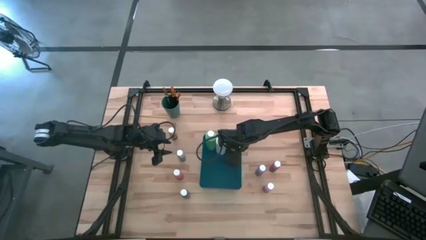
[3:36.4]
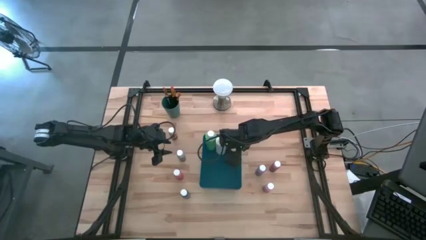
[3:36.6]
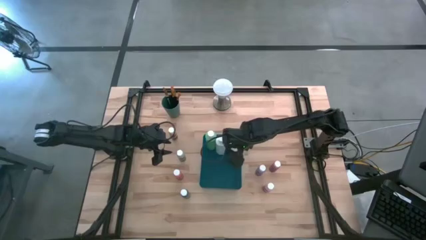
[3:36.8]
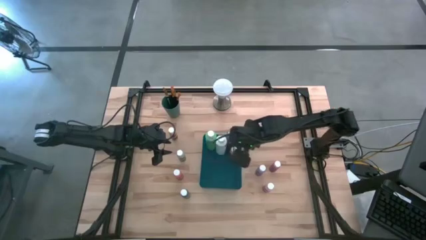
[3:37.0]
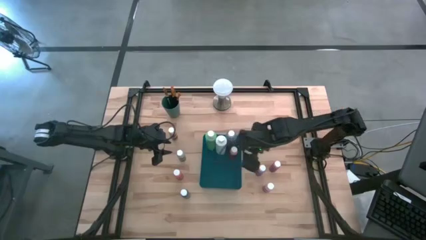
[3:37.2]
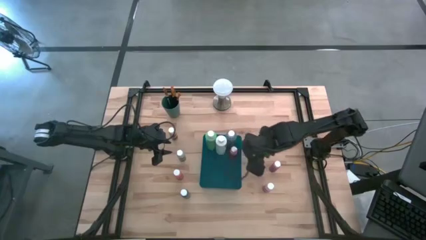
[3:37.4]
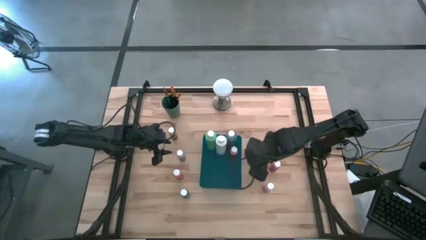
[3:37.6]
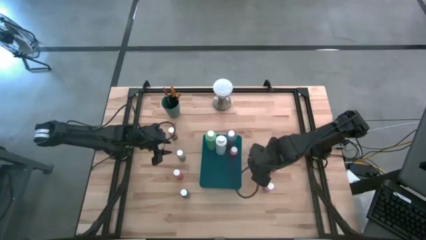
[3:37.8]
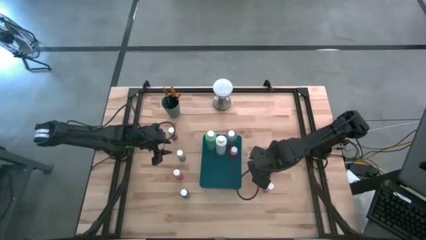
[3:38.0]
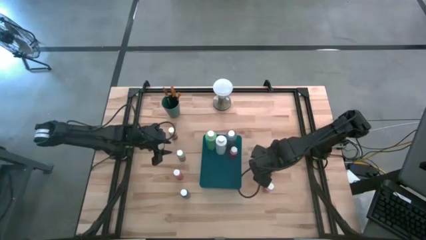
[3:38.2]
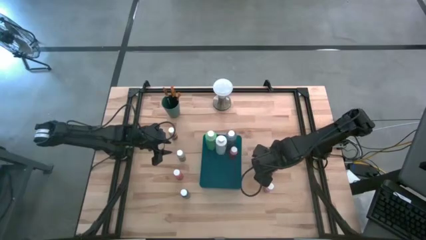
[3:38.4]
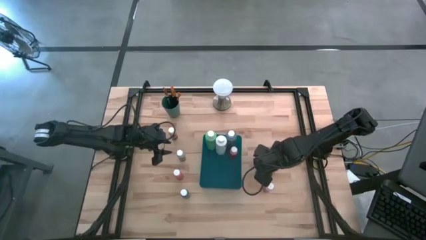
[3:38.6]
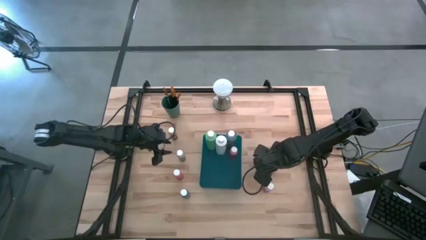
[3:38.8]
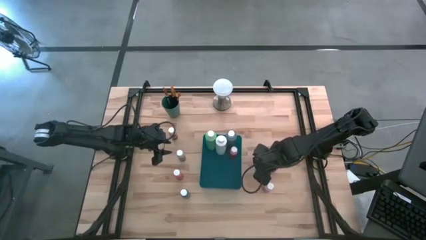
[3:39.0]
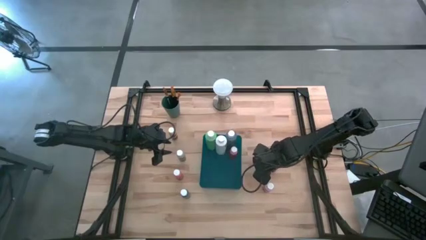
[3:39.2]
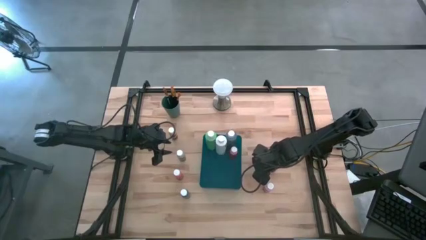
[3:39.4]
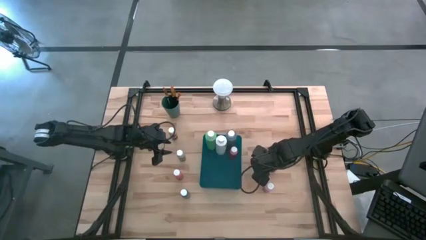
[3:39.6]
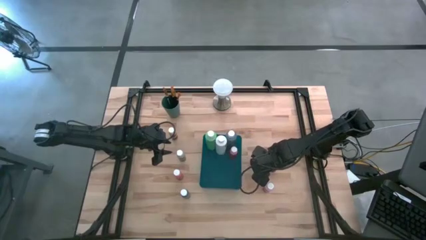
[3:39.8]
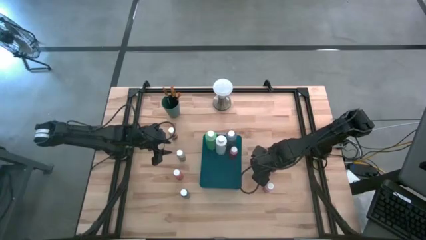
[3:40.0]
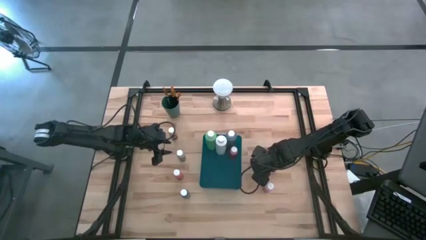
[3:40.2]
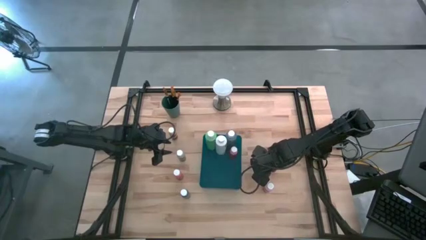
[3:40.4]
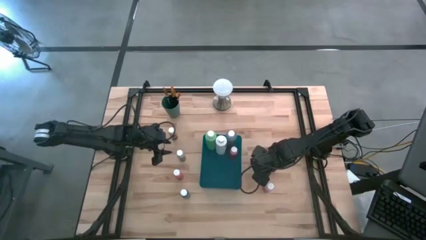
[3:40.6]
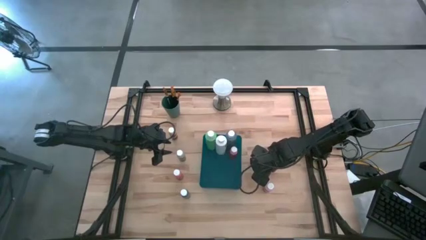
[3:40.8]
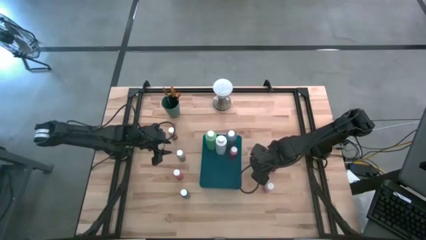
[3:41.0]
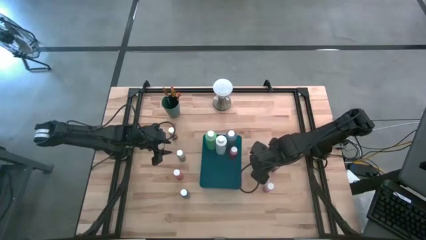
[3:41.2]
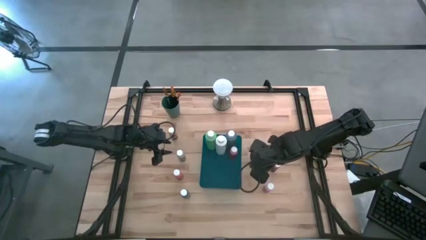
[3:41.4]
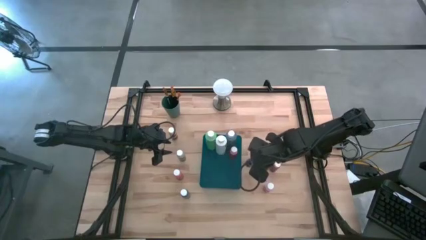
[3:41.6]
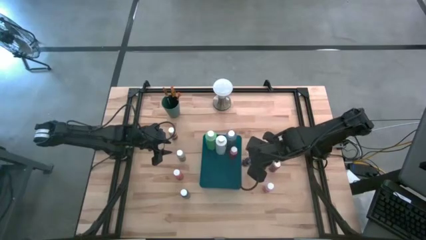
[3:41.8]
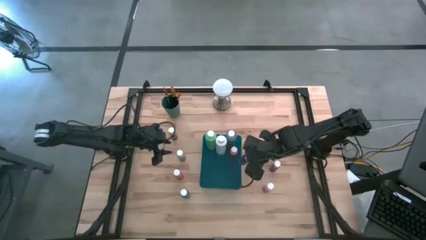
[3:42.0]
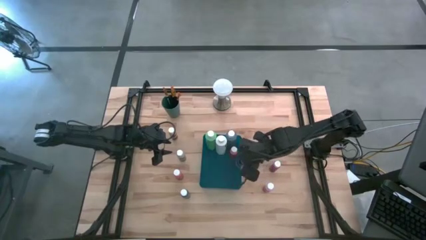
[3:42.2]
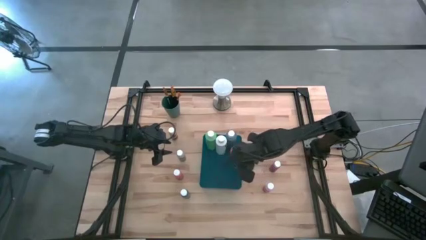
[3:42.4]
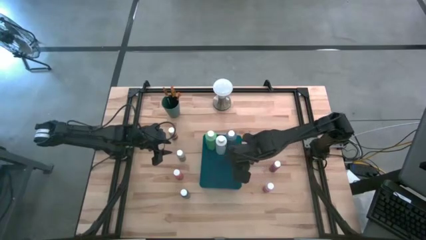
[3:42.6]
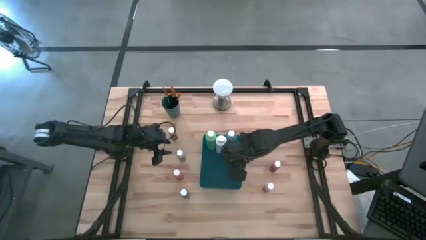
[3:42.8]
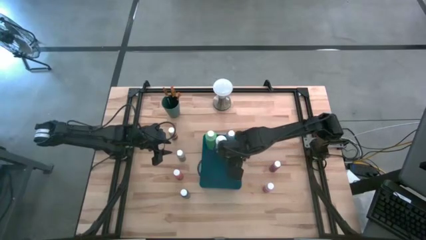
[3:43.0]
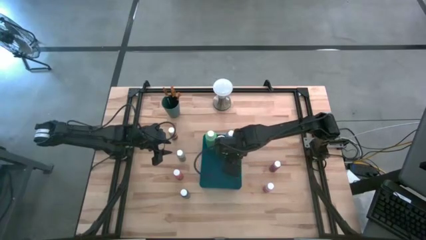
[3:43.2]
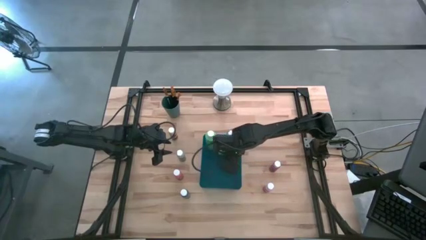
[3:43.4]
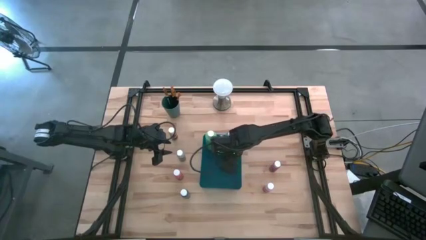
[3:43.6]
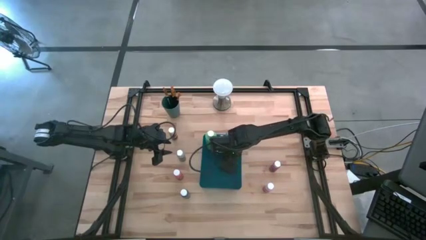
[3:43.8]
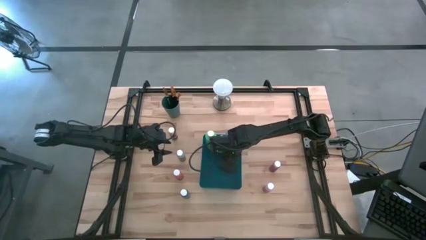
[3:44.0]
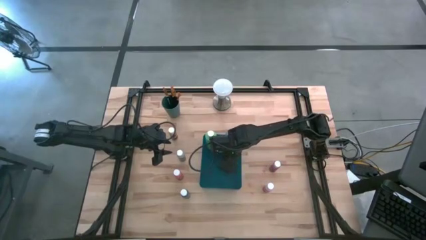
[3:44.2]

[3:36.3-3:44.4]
Task: Pick & Place Paint Supplies
Put the purple paint bottle into the blue bin

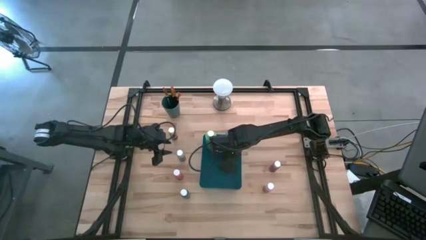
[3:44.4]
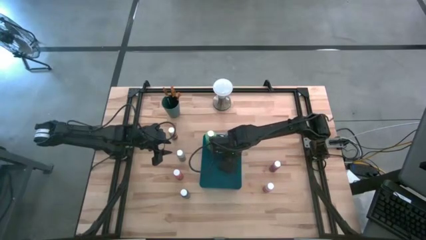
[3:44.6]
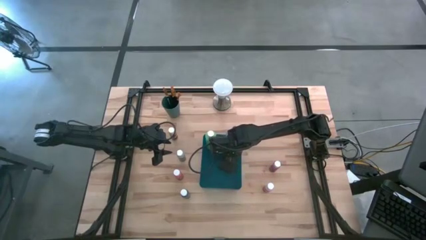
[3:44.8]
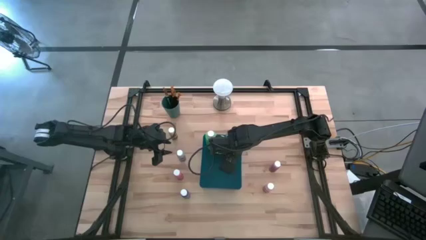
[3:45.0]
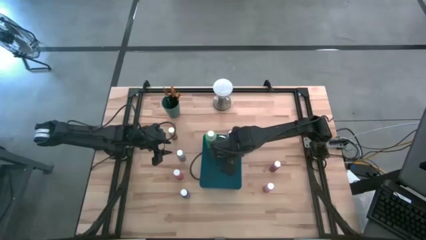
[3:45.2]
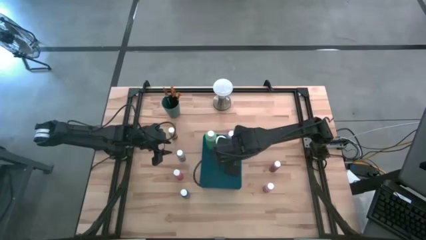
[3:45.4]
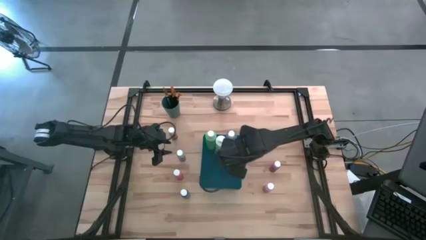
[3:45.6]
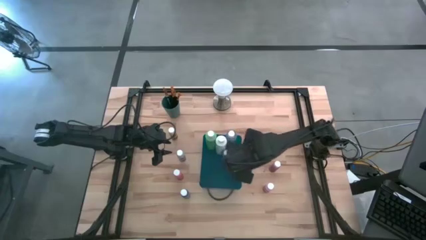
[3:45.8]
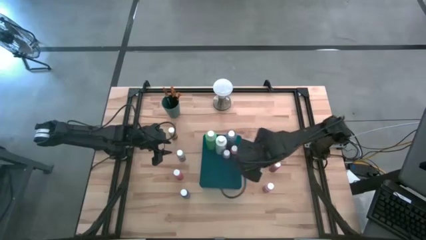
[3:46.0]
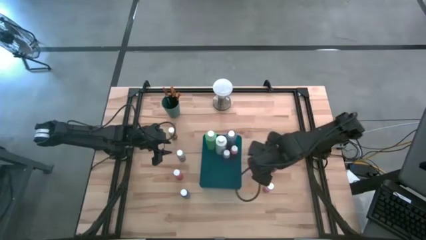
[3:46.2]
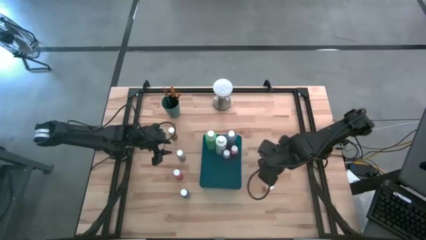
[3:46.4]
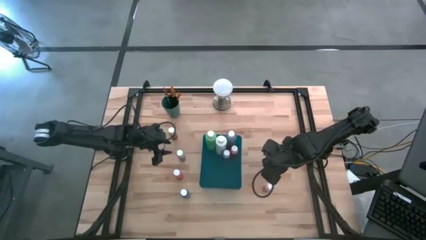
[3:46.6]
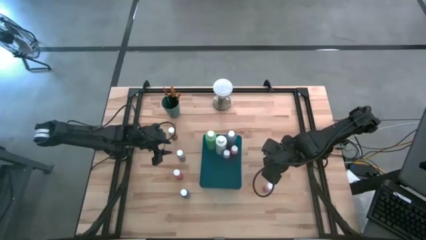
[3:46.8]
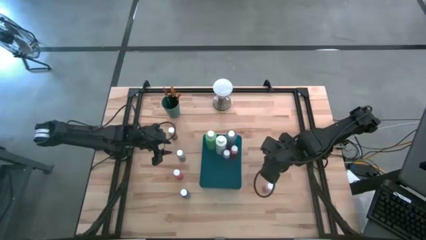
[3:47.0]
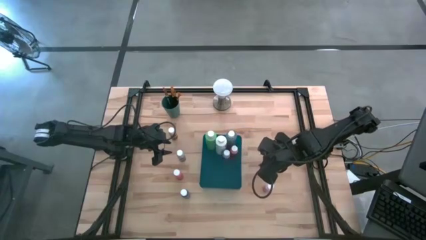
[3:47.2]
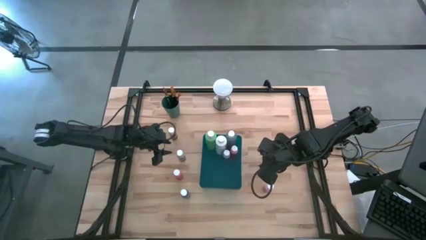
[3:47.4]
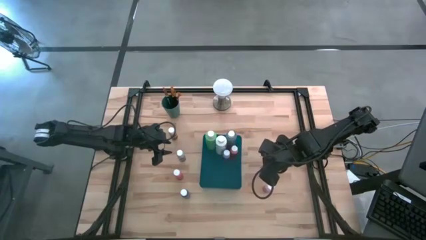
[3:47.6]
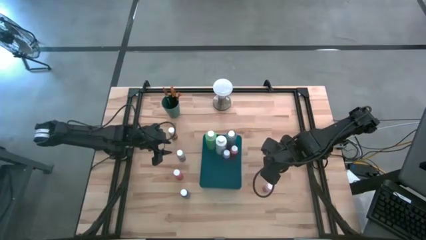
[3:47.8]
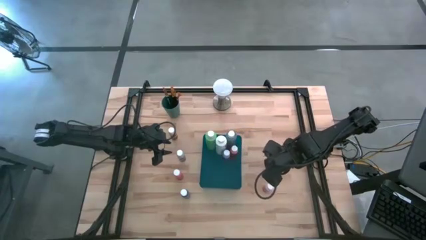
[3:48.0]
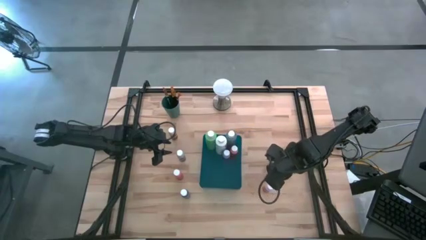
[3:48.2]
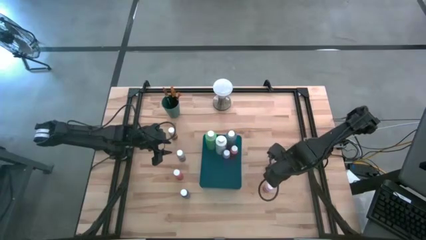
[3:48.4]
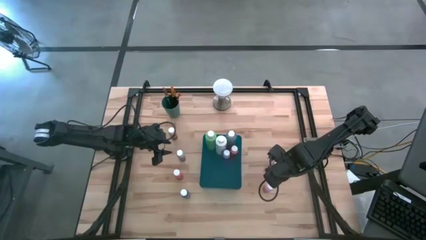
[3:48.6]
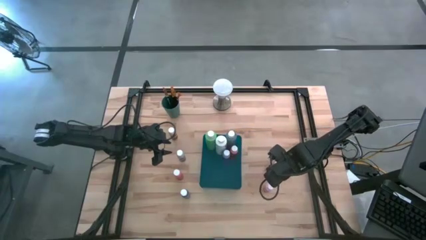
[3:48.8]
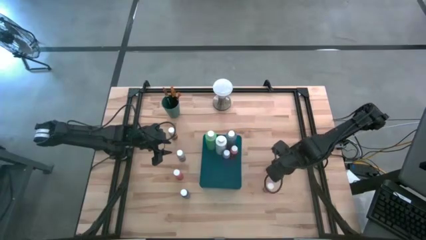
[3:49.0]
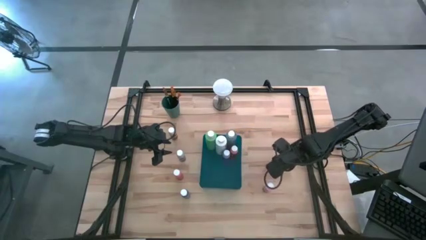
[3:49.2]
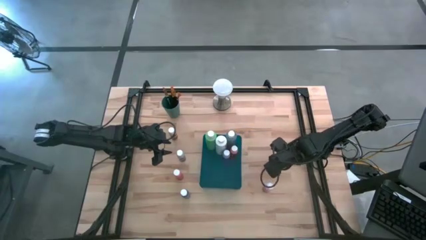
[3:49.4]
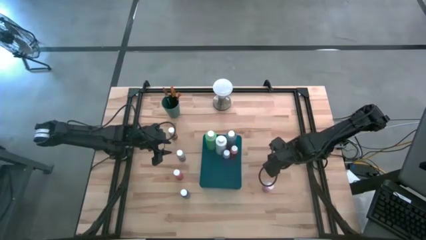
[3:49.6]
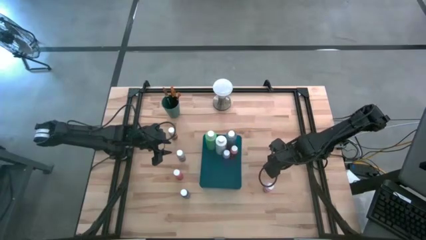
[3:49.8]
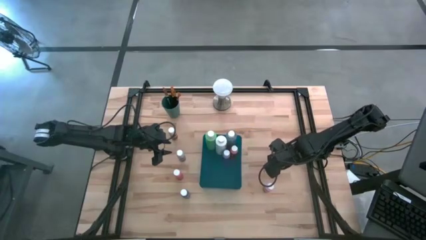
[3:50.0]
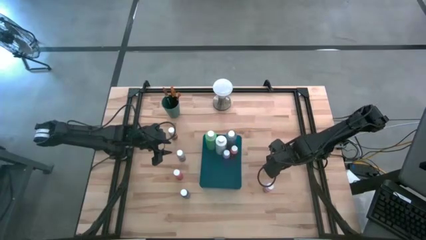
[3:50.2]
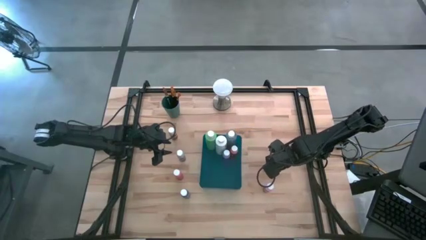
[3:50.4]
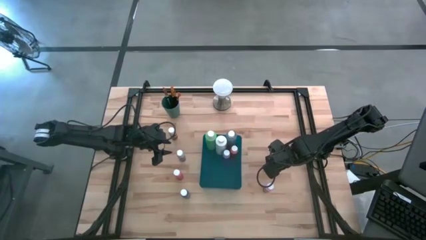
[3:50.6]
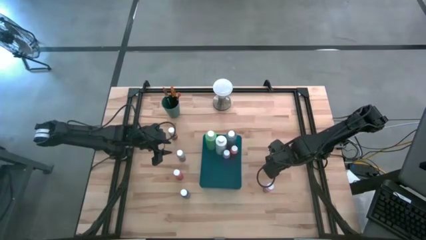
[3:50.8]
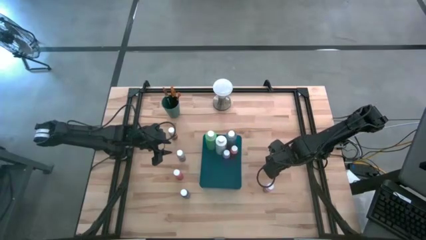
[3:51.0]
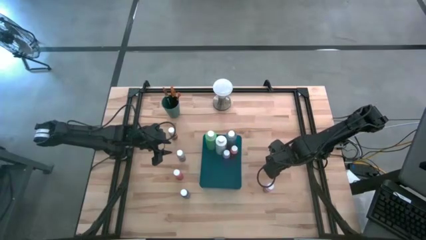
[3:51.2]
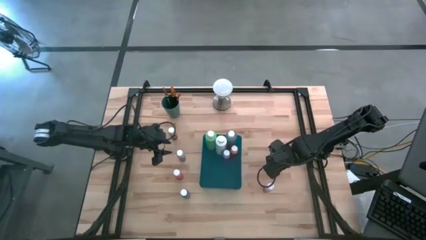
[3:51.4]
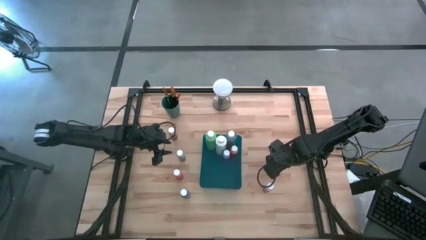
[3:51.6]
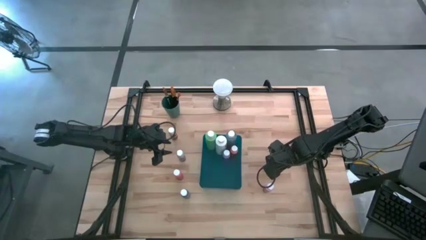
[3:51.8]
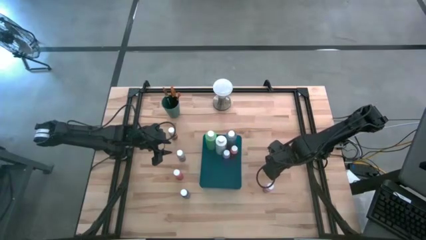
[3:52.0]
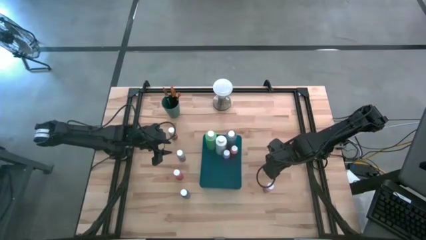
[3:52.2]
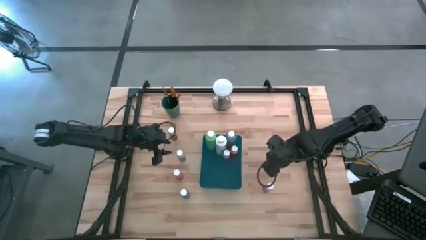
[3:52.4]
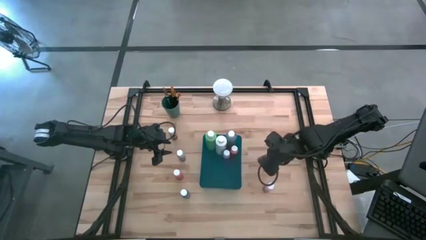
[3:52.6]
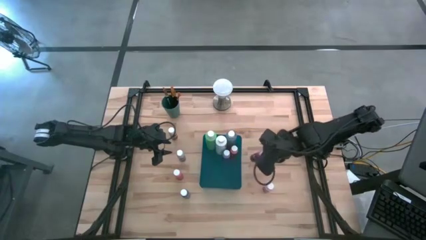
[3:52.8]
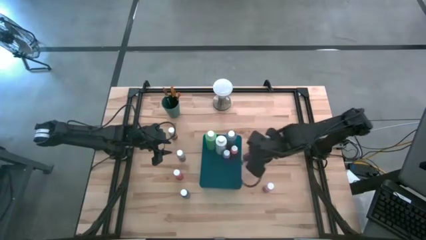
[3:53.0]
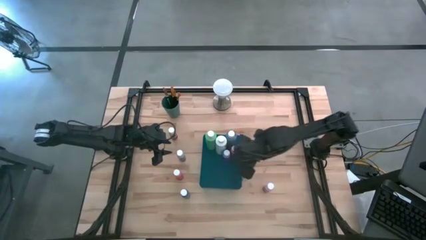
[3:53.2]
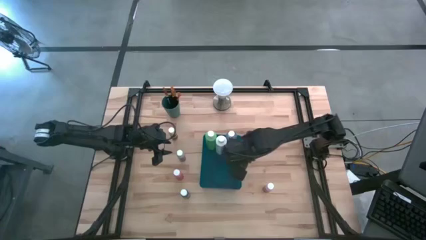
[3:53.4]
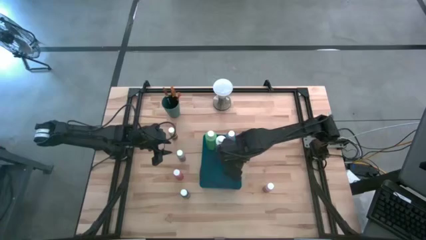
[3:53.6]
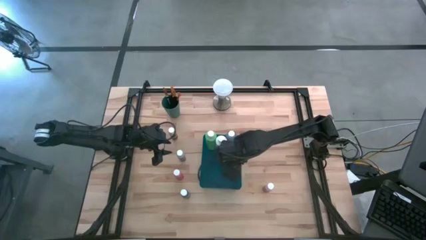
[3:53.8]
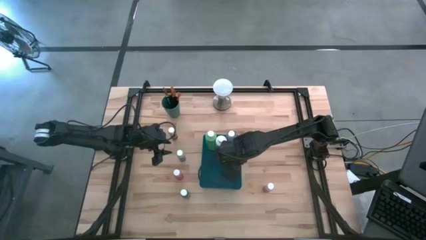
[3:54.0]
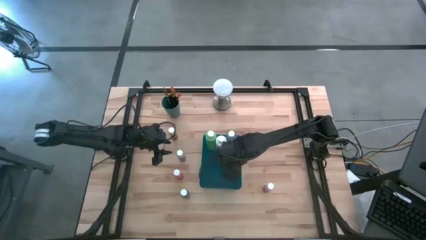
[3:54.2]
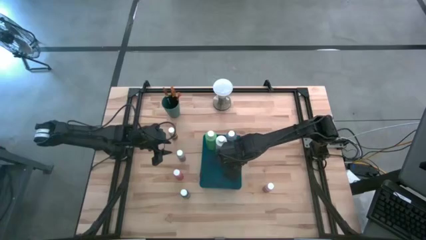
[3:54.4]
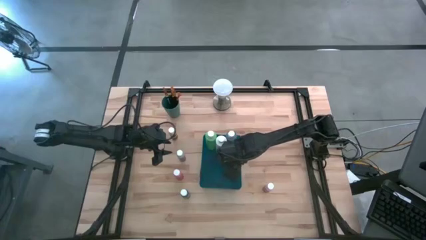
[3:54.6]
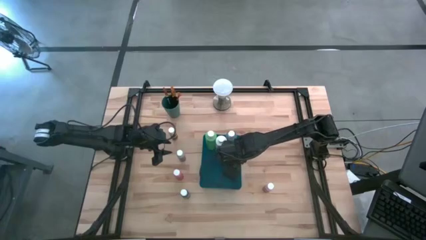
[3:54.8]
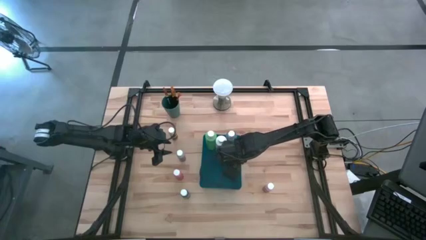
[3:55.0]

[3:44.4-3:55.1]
Put the pink paint bottle into the blue bin
